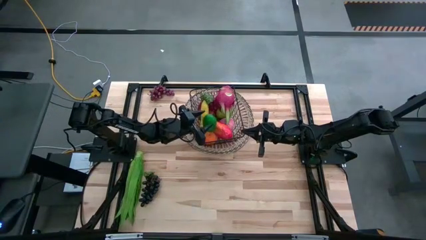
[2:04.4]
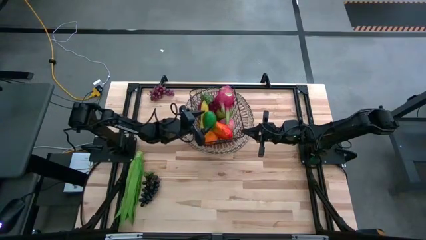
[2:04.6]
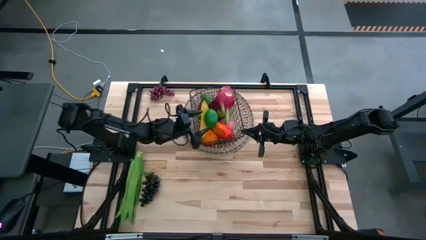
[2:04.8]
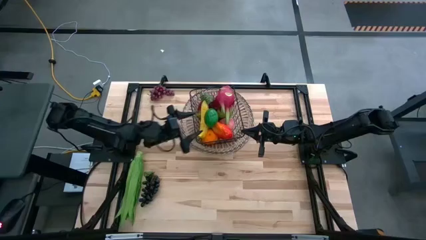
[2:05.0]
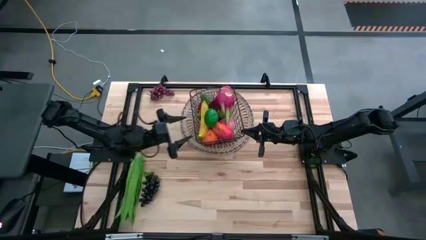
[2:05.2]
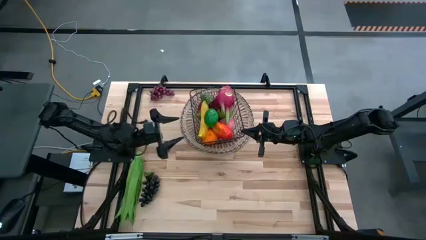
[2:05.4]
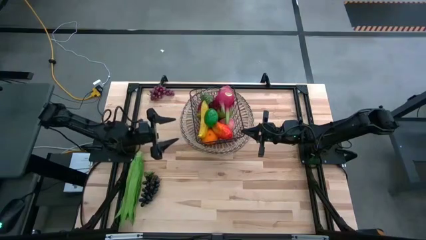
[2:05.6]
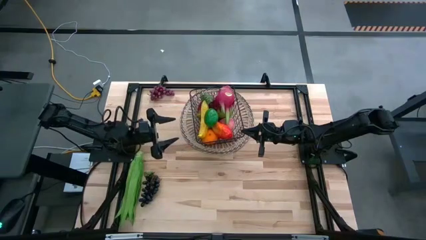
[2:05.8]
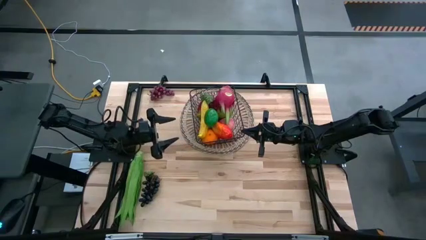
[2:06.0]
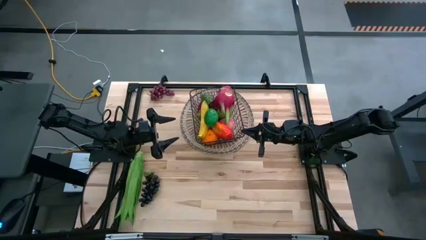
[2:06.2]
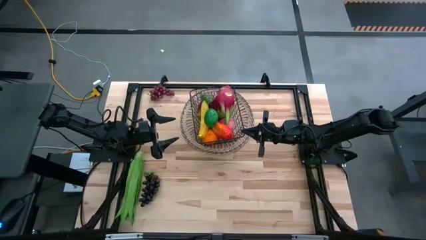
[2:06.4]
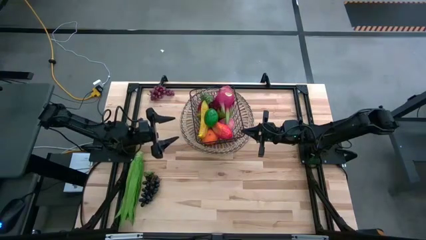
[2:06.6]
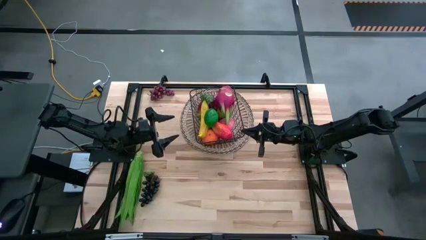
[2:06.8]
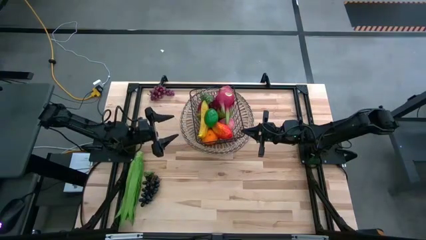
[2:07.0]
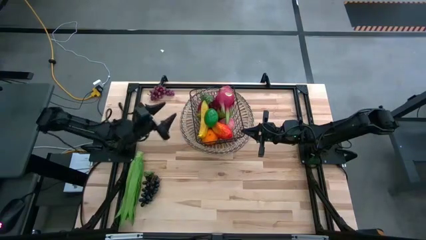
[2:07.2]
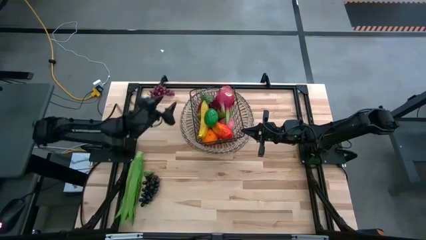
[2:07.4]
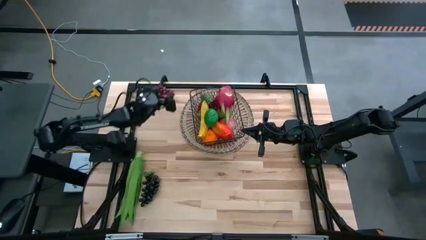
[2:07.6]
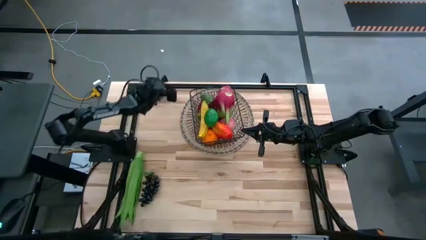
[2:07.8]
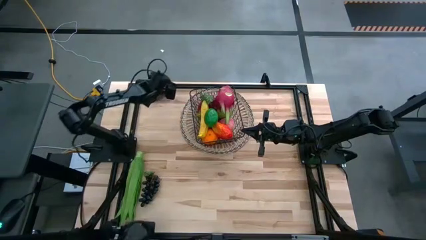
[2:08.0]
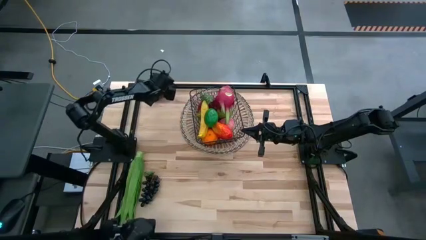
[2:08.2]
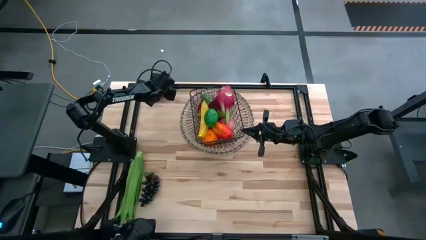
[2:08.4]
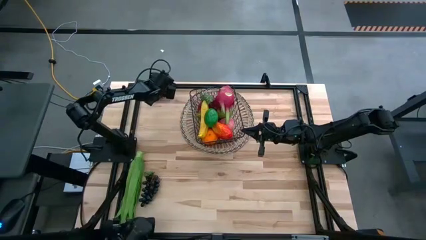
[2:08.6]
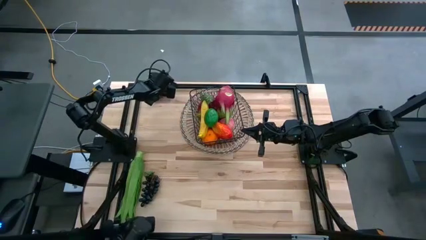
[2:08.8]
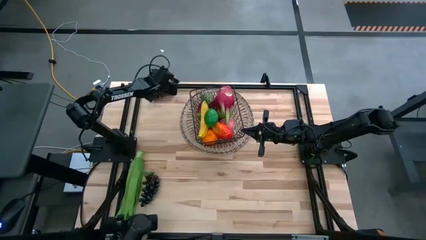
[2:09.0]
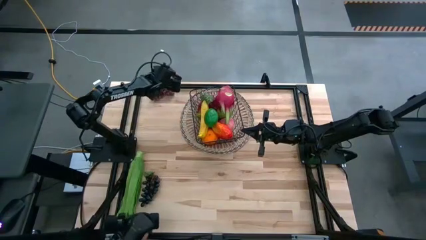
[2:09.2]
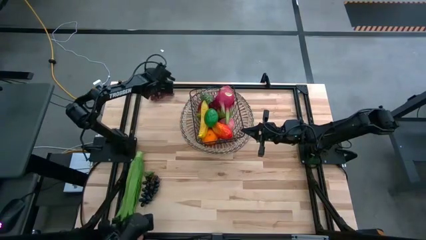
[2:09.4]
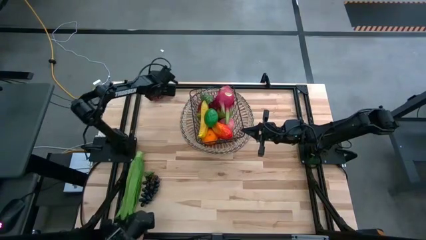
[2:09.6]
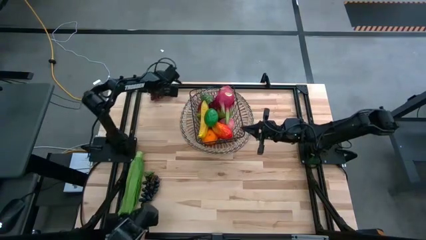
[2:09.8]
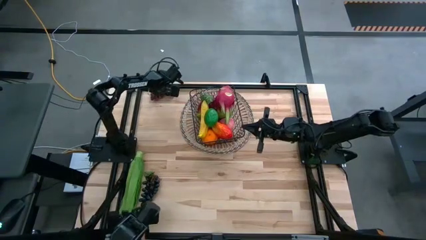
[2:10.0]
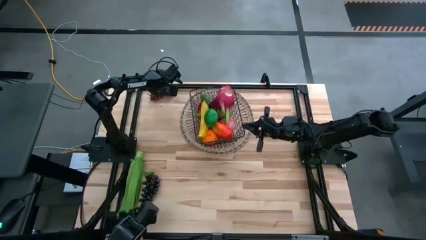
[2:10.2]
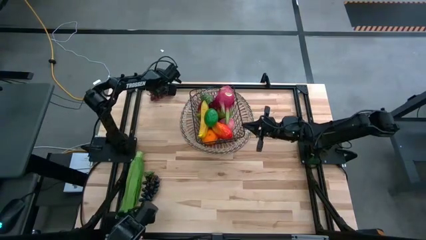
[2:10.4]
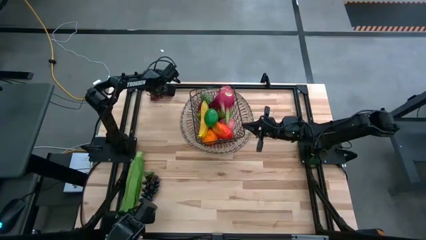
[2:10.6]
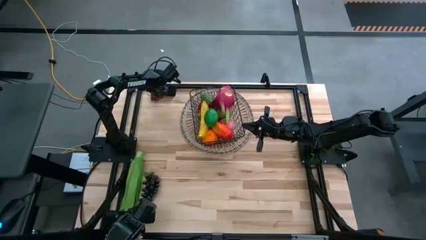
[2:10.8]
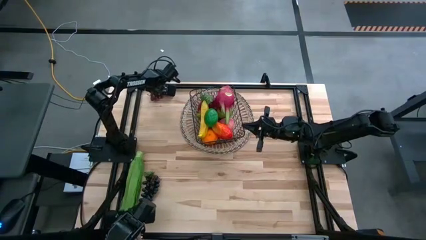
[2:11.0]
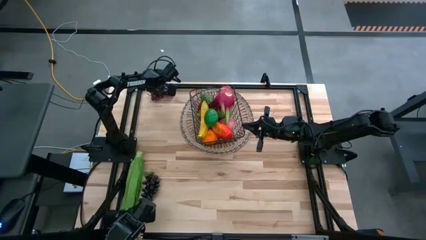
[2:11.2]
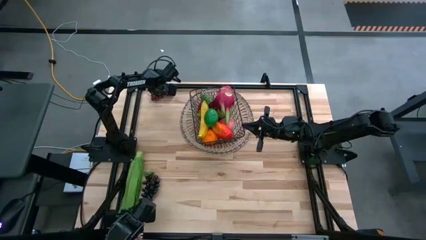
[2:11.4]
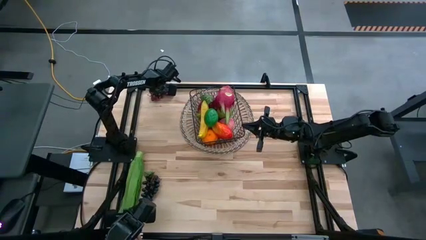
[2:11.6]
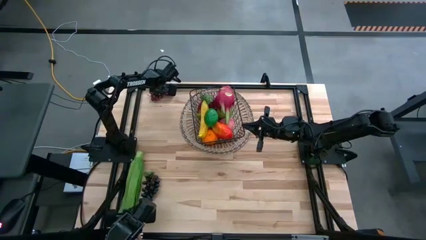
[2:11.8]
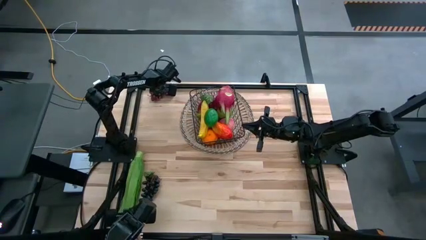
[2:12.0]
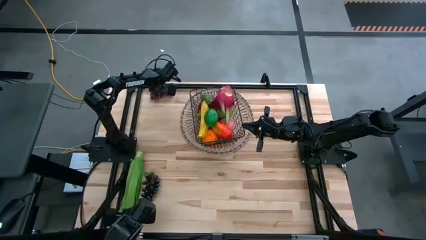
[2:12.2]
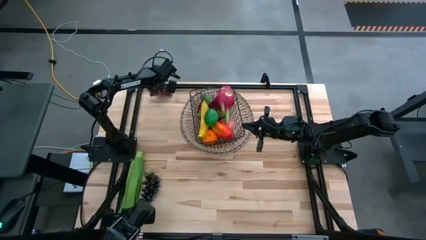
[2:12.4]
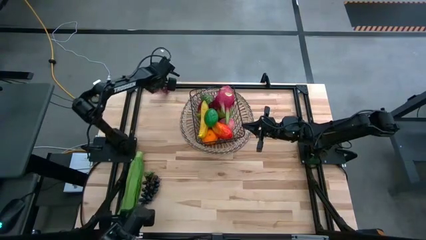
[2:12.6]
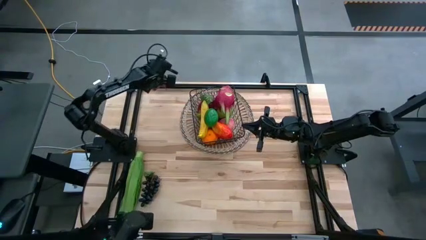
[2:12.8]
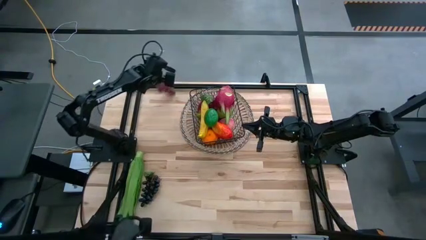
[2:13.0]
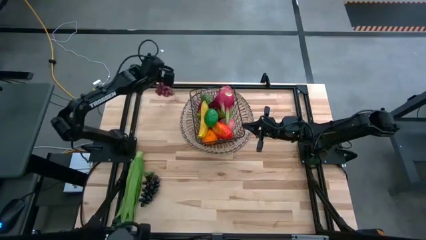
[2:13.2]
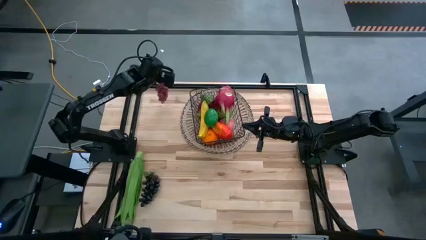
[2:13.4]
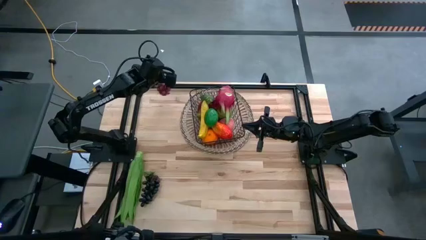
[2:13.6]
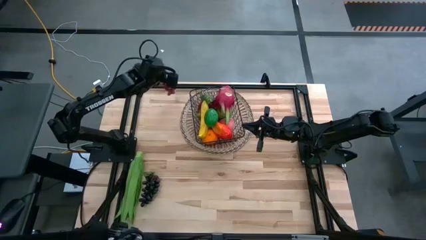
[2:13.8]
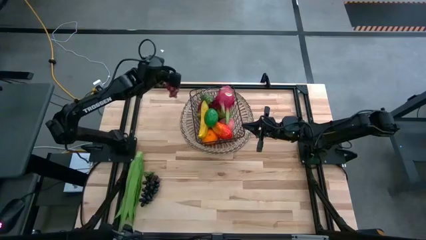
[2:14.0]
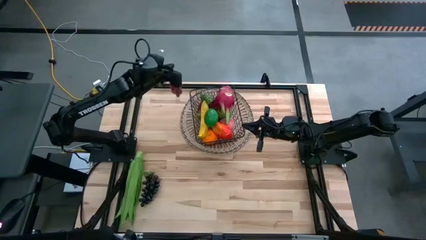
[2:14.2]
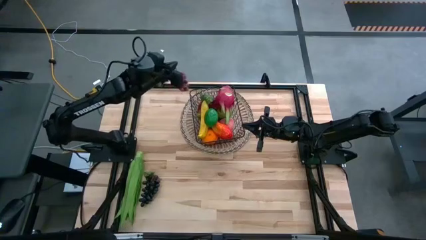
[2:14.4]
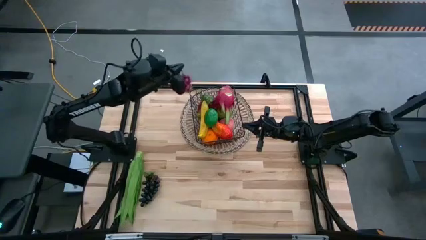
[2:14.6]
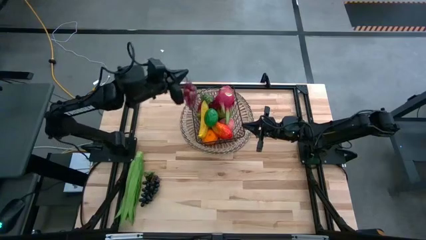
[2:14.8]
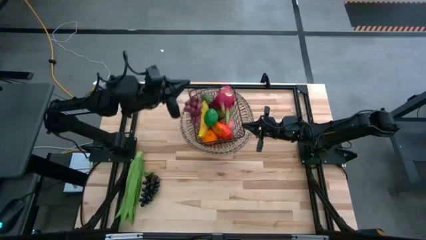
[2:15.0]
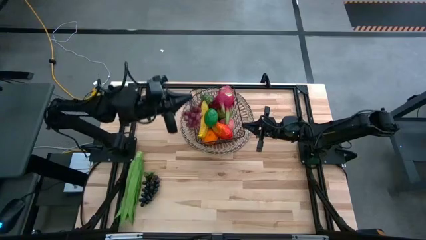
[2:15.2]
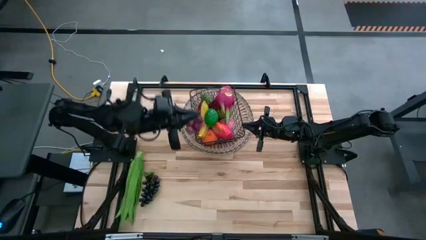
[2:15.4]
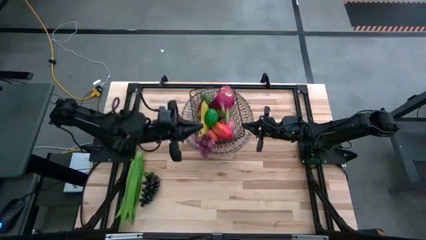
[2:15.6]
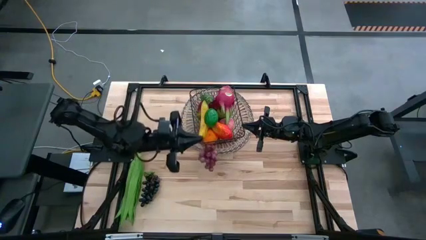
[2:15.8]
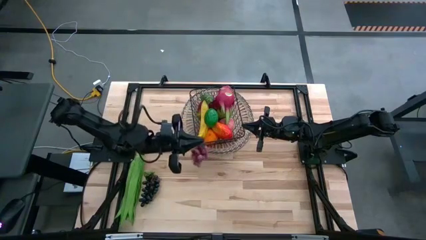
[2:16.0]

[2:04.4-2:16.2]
Task: Build produce basket
Put the top purple grapes into the black wire basket

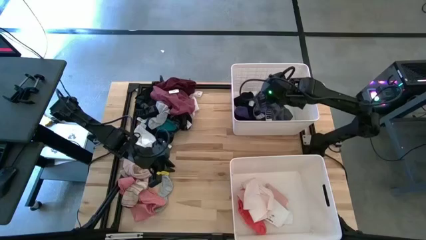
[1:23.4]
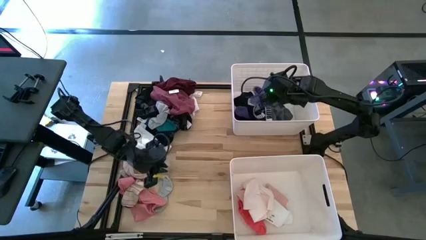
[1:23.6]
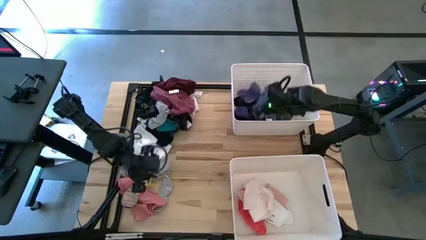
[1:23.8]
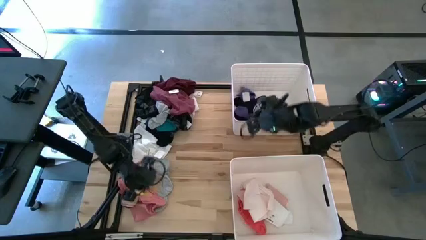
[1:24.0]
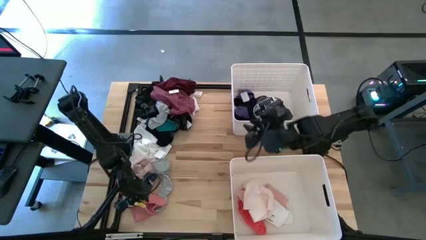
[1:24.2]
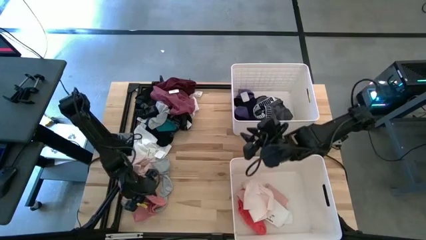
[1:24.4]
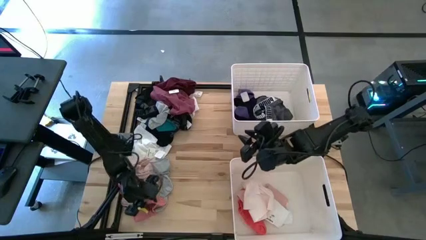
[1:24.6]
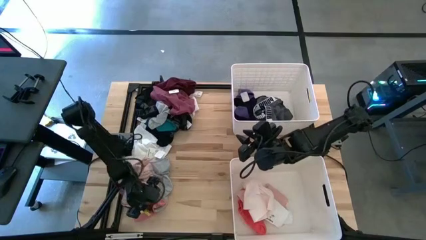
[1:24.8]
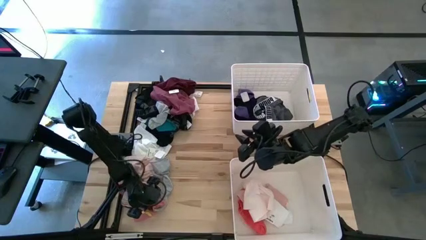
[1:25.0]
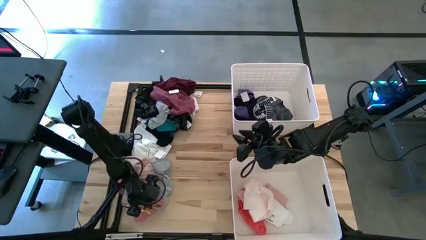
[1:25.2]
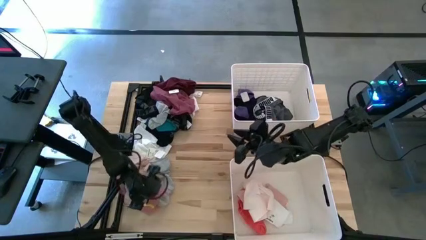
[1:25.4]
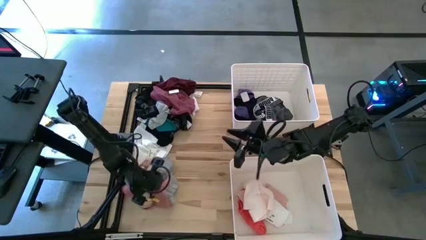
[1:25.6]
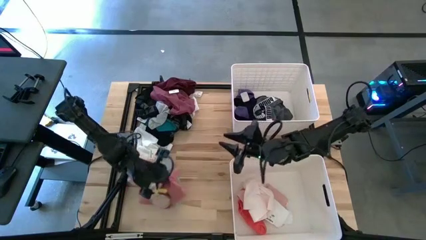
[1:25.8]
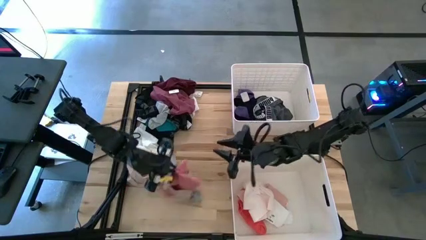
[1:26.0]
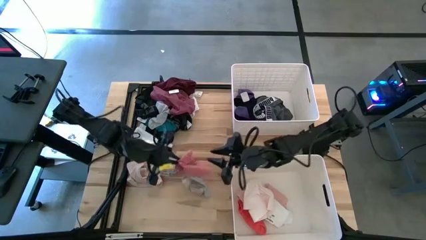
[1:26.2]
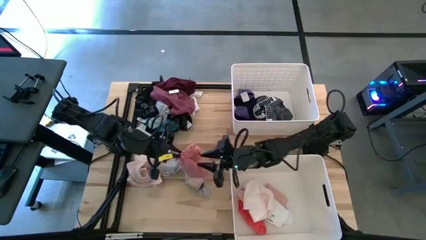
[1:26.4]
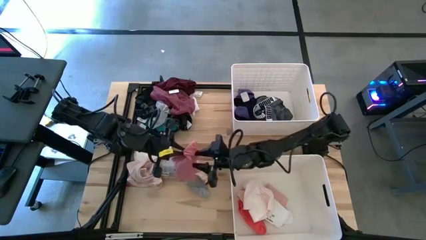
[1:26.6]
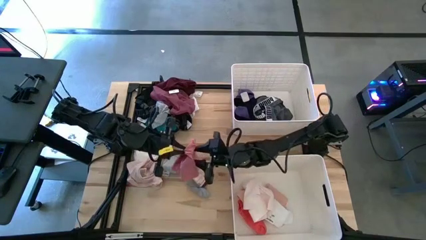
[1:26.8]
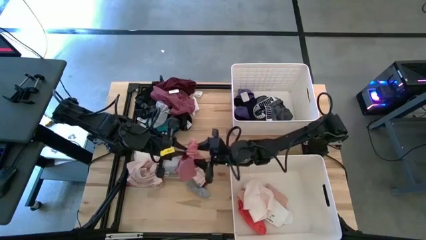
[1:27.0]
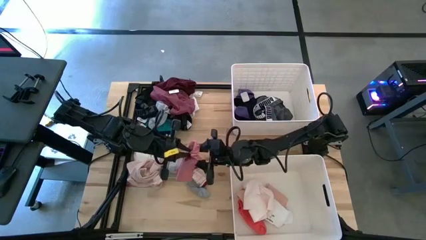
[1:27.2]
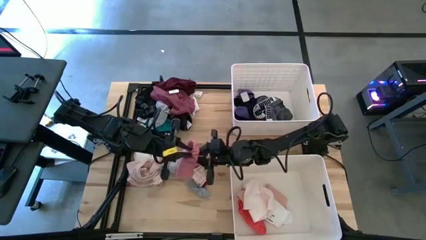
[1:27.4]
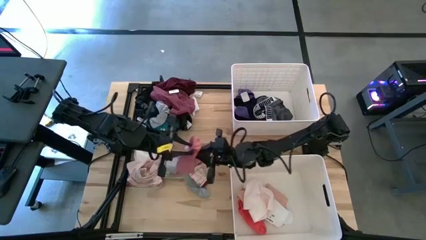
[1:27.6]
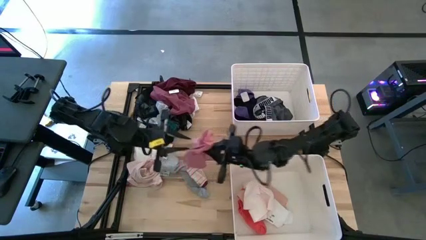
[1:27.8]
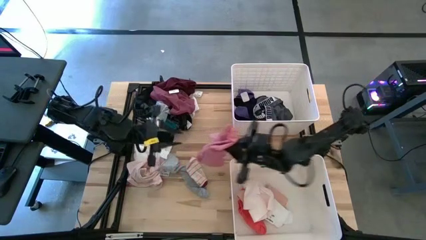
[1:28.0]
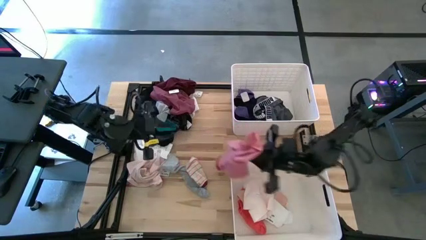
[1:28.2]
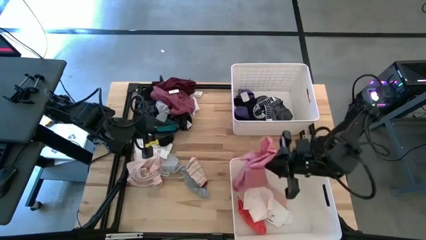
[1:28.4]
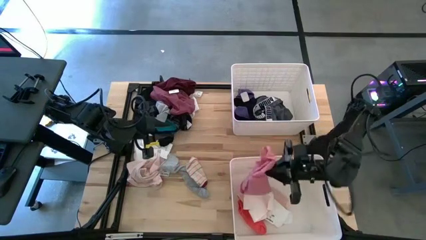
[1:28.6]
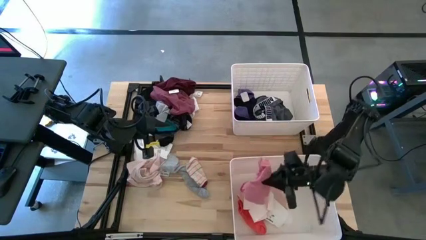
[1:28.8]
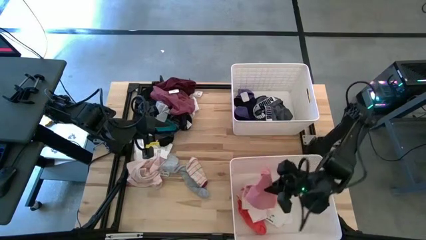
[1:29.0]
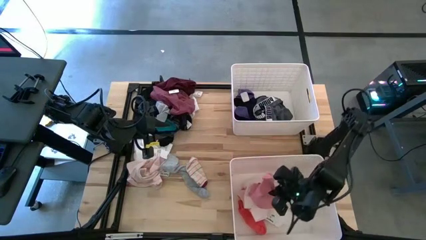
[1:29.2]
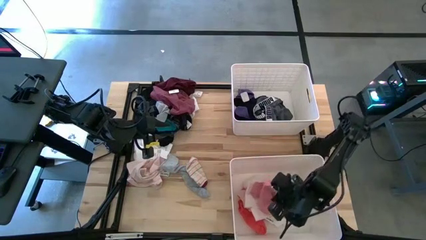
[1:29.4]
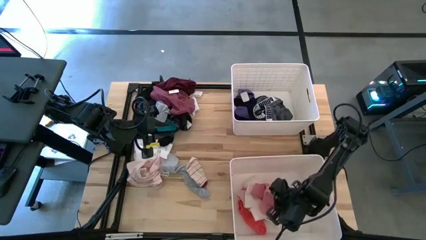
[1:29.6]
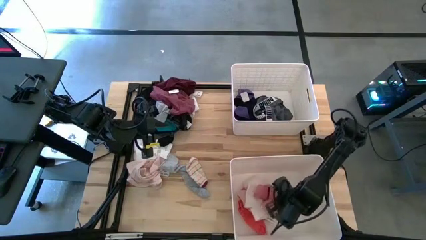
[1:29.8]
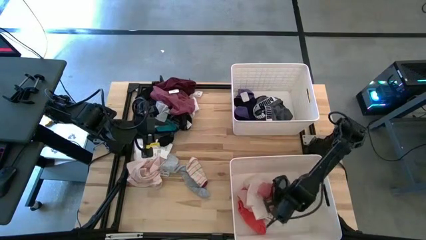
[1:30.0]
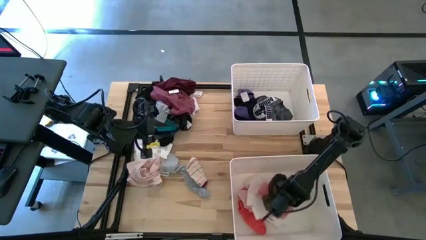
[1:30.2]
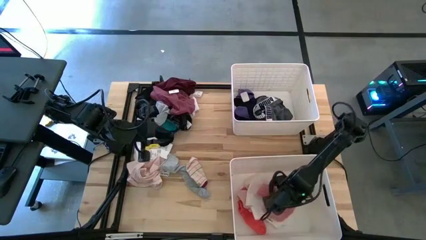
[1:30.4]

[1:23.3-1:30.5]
Task: Sort clothes
Put the pink shirt into the bottom bin
